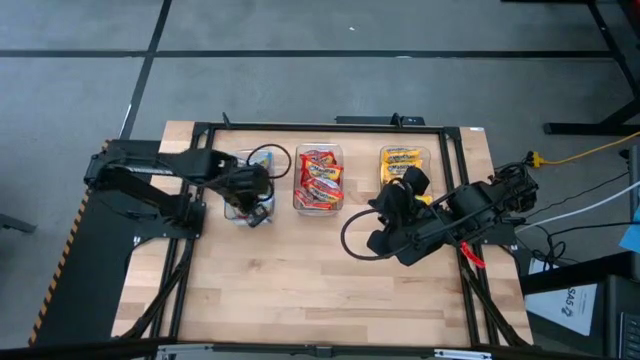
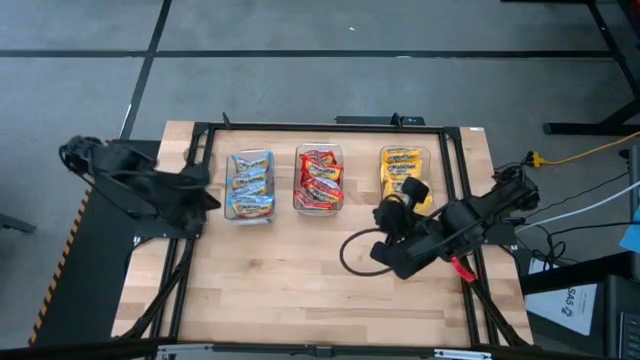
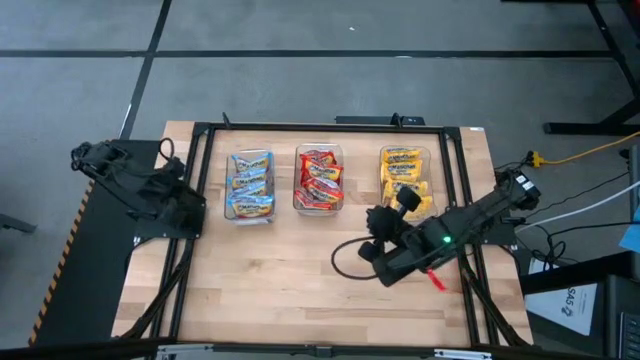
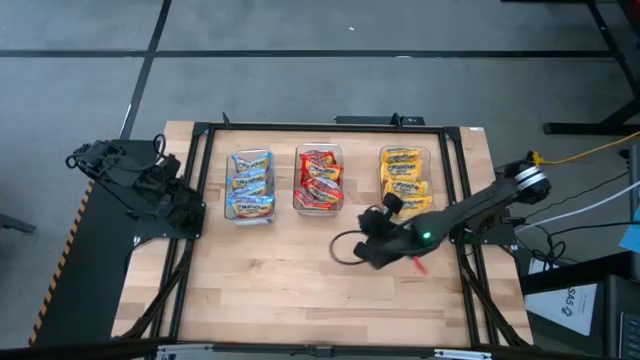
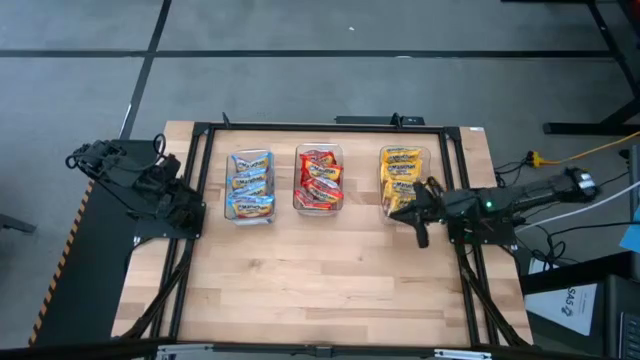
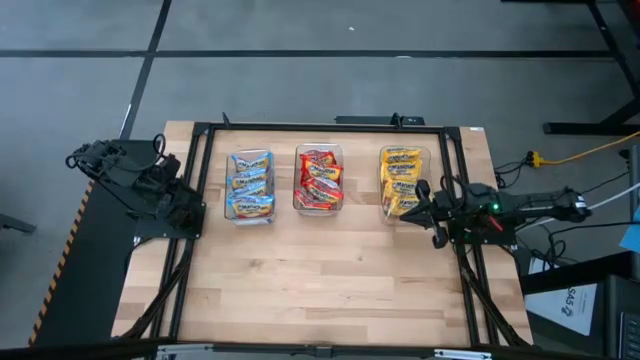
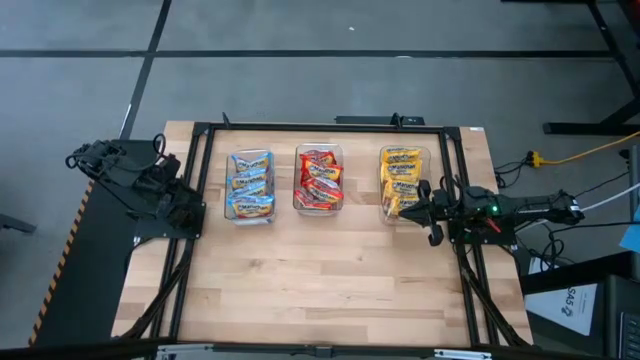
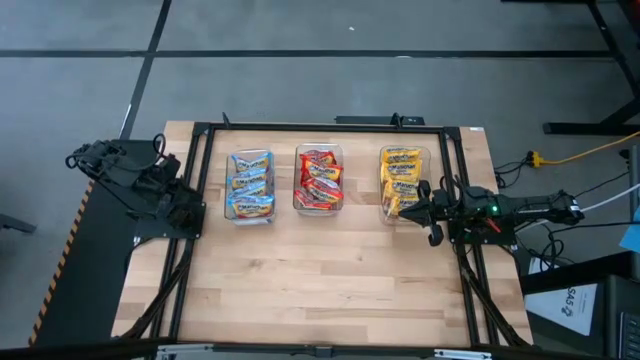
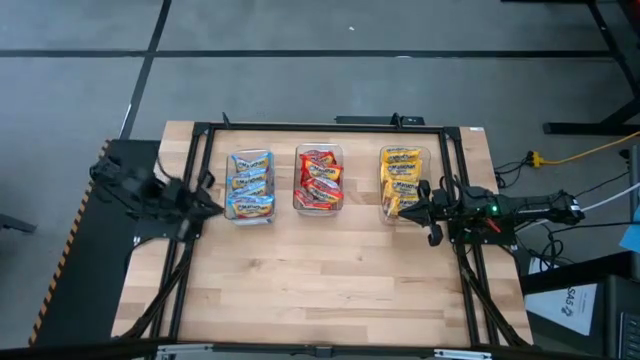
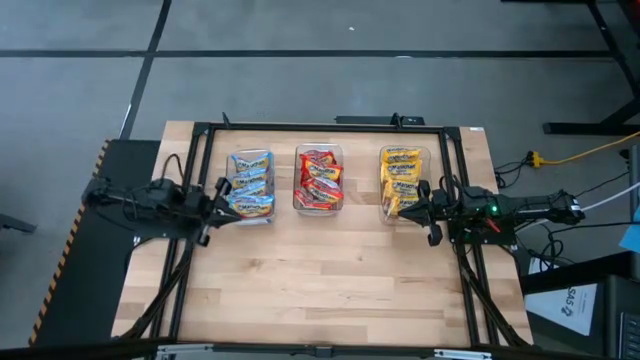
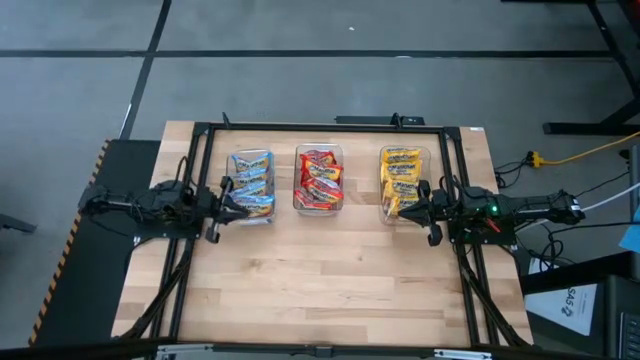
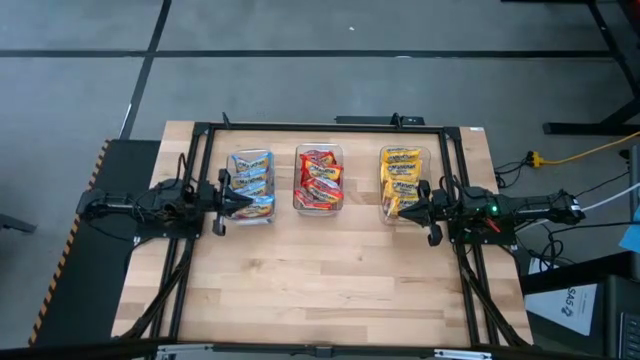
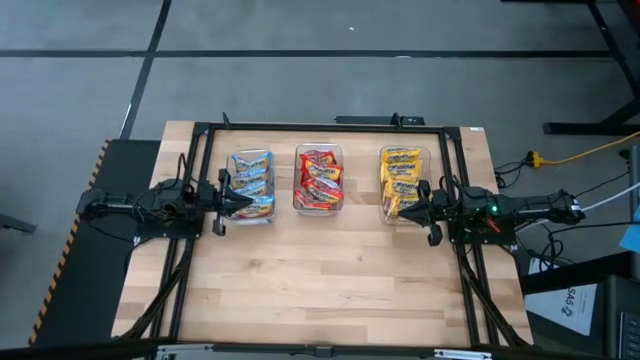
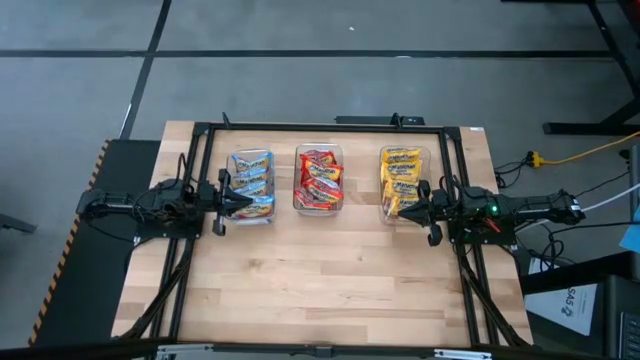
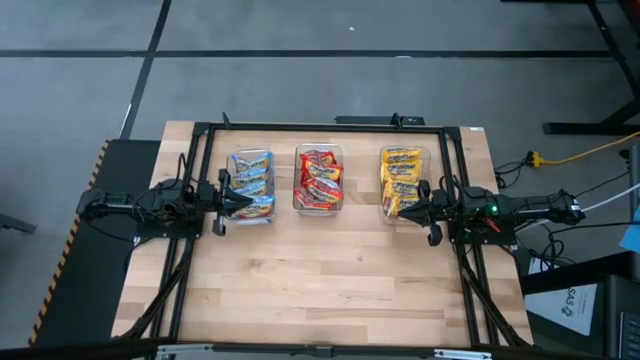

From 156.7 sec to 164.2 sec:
Task: Sort Maruchan noodles
Return to home position

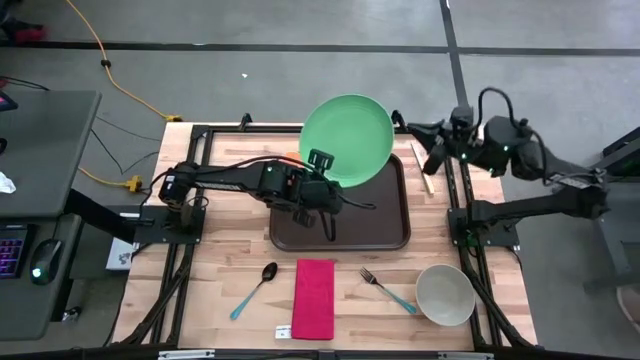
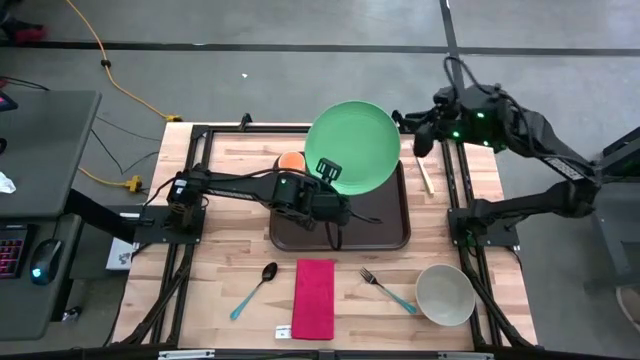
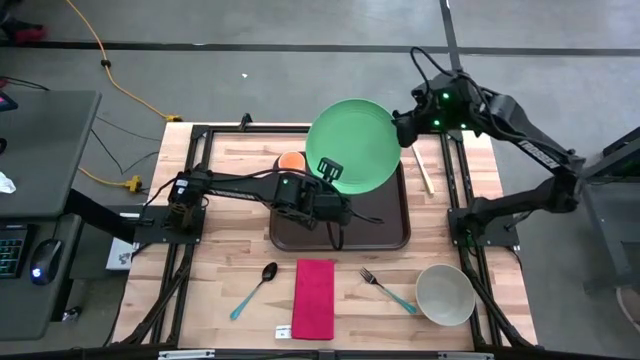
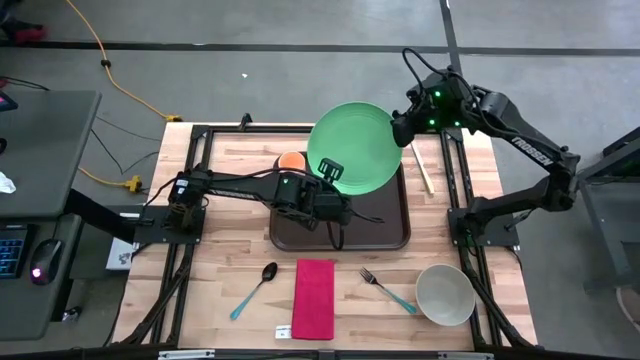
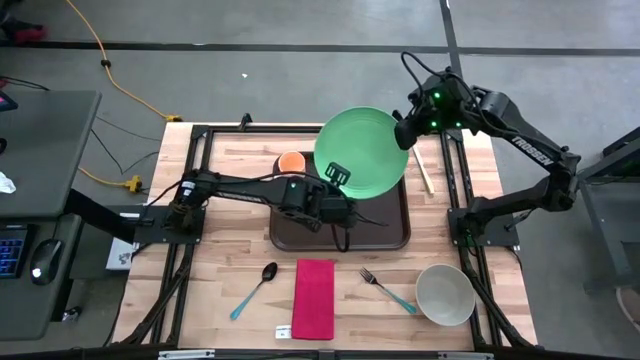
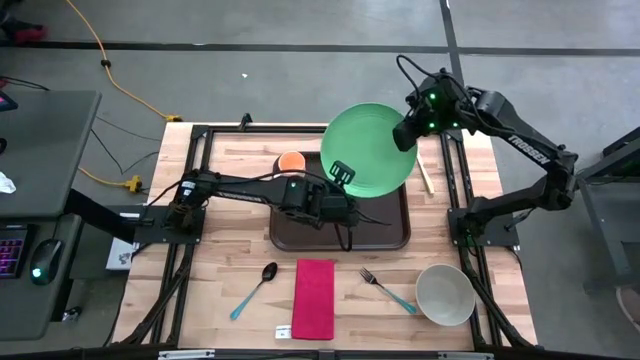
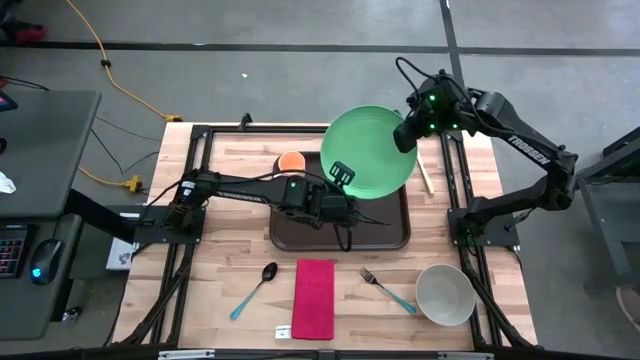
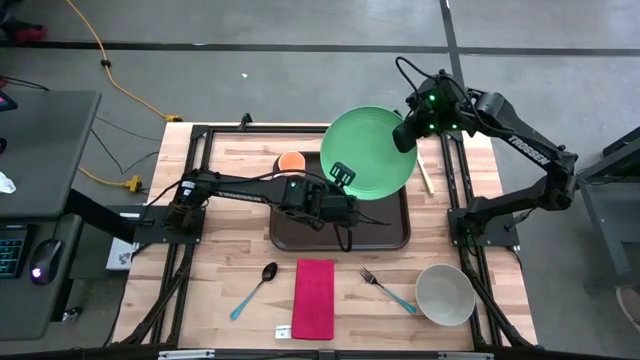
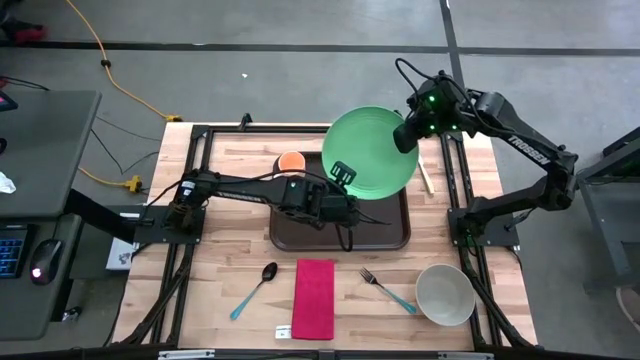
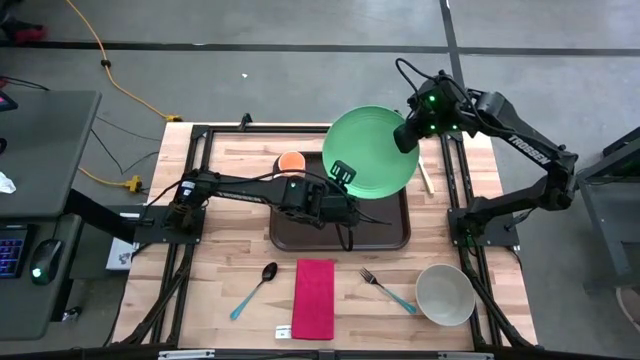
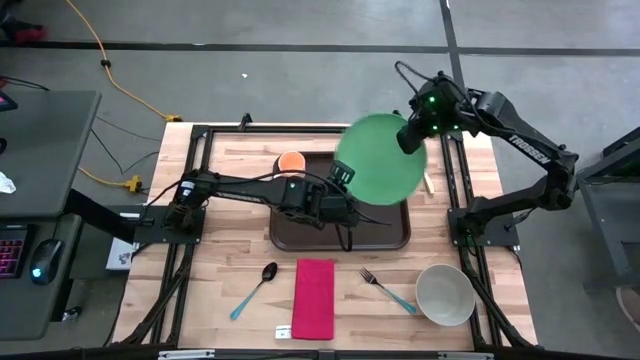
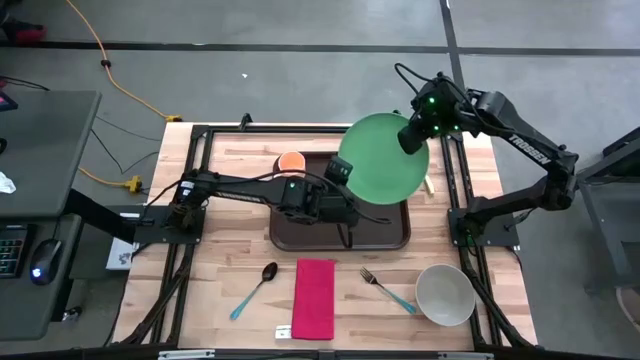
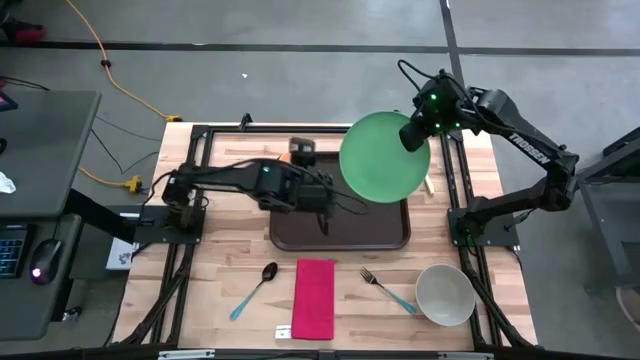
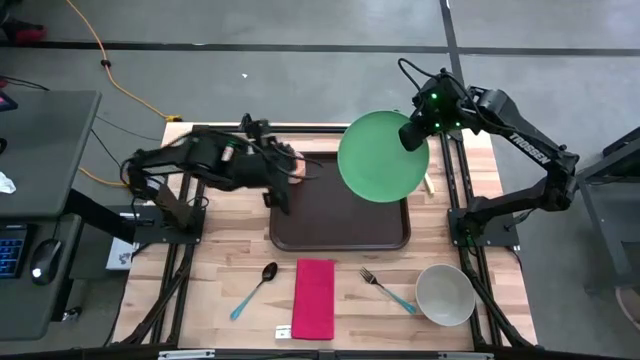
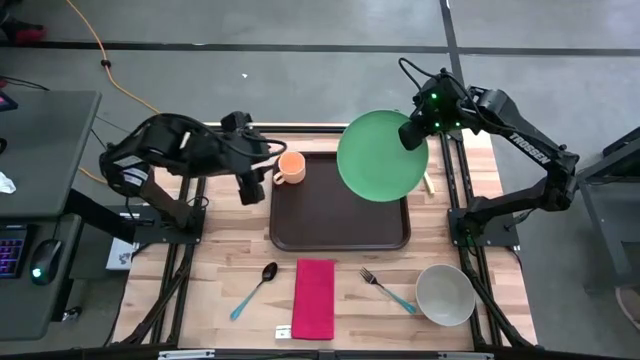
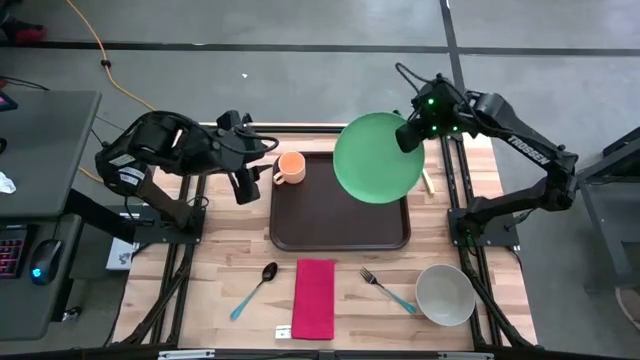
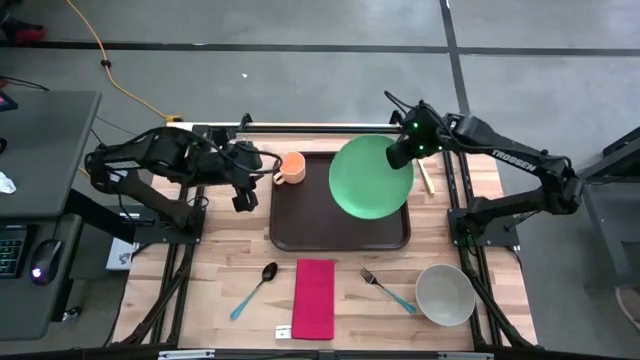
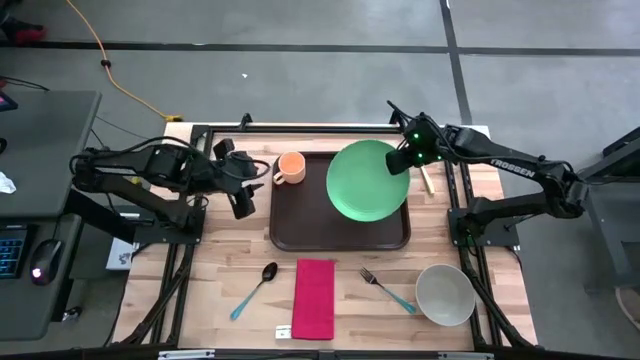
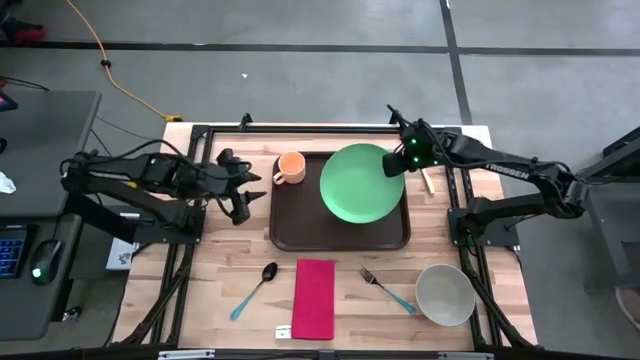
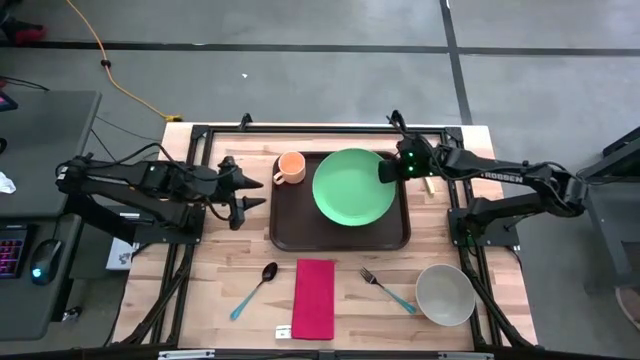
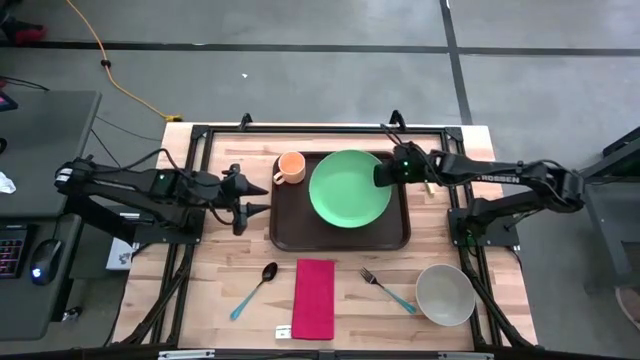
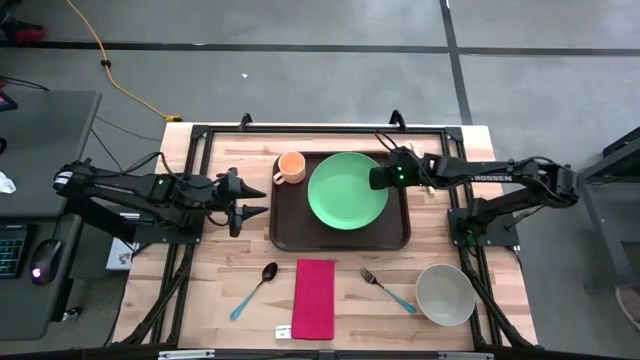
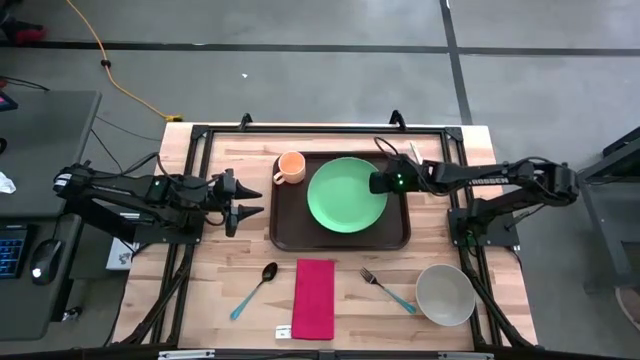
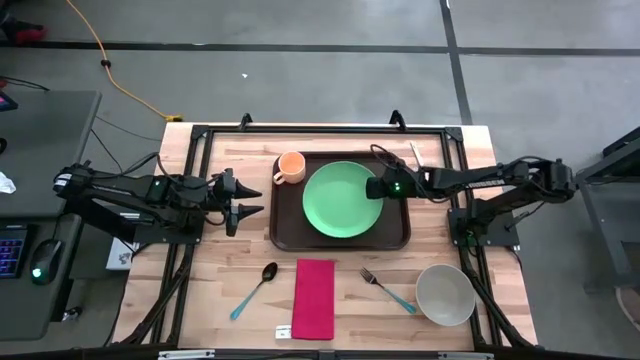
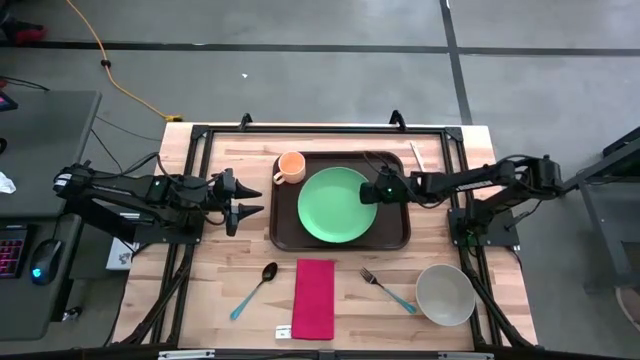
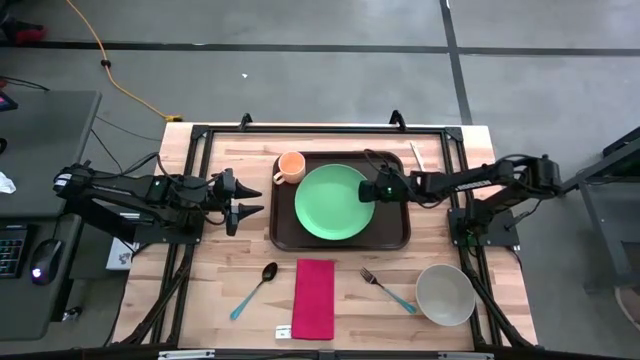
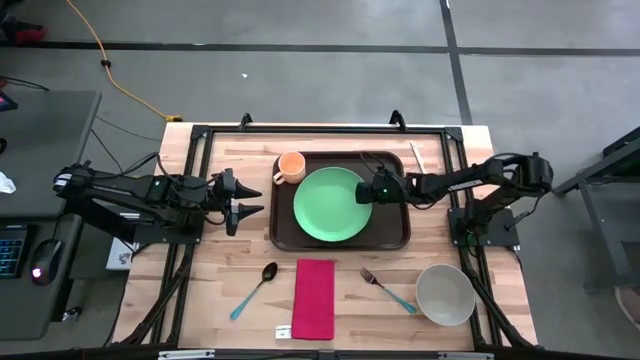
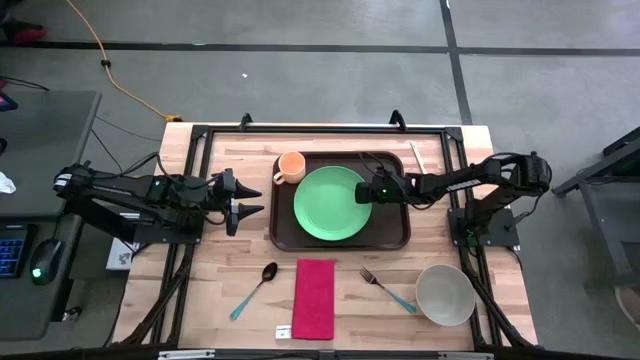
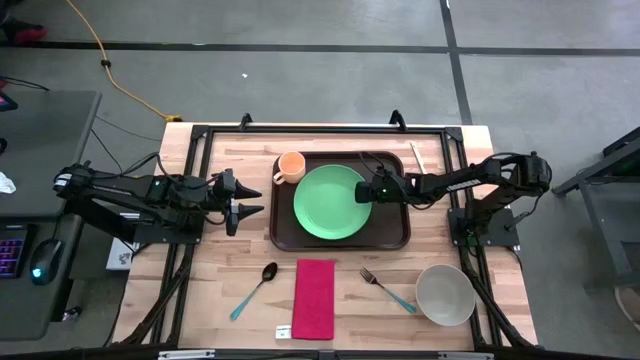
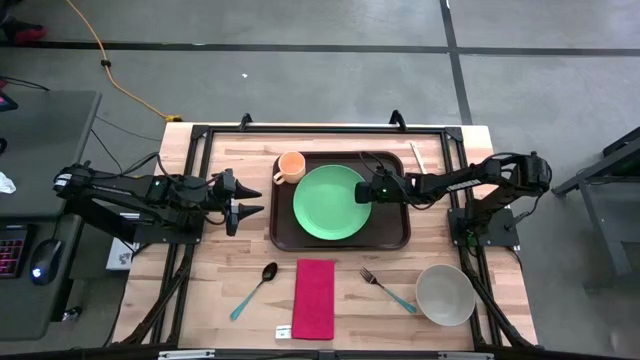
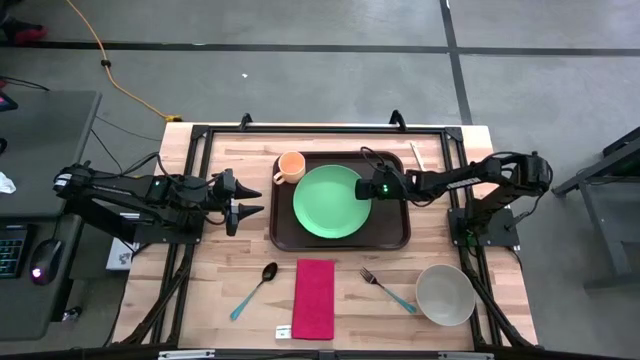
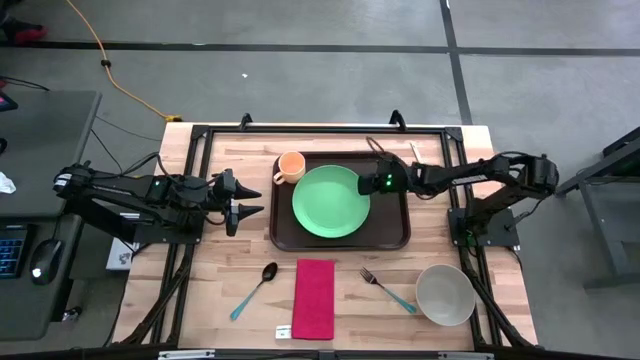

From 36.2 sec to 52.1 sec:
Task: Set up tray
Put the green plate on the brown serving tray to the bottom right of the yellow cup
